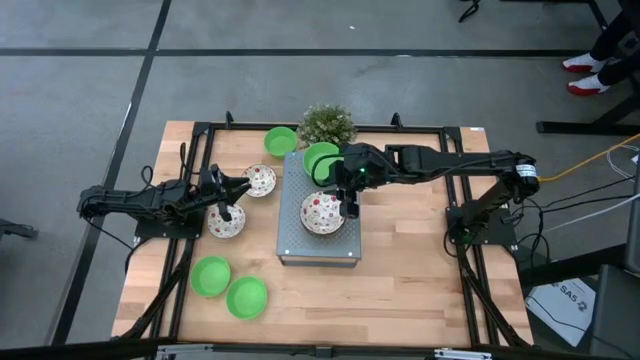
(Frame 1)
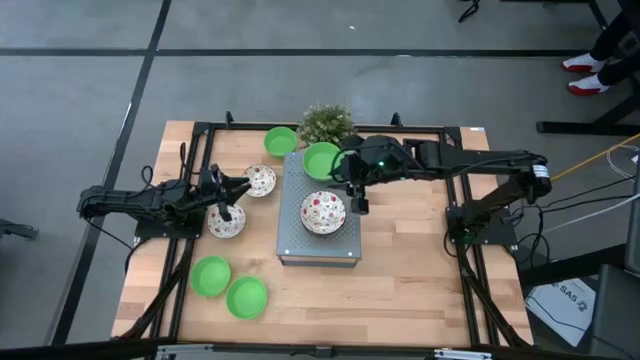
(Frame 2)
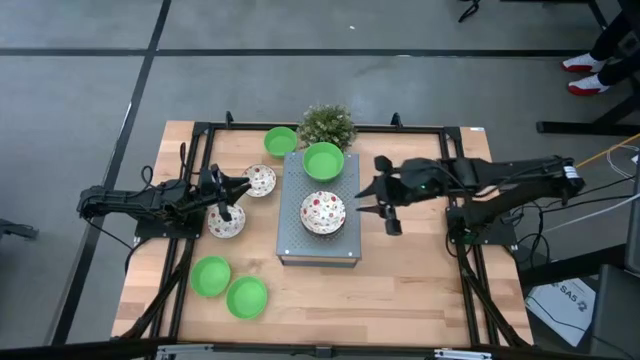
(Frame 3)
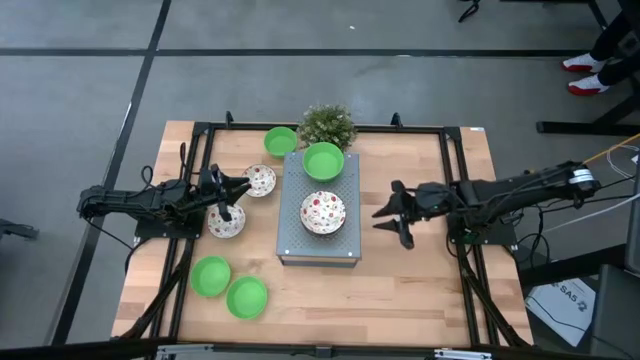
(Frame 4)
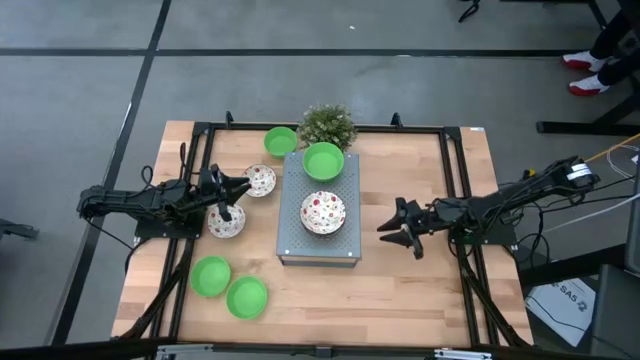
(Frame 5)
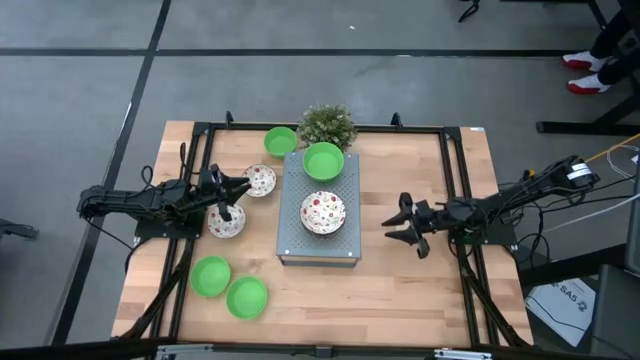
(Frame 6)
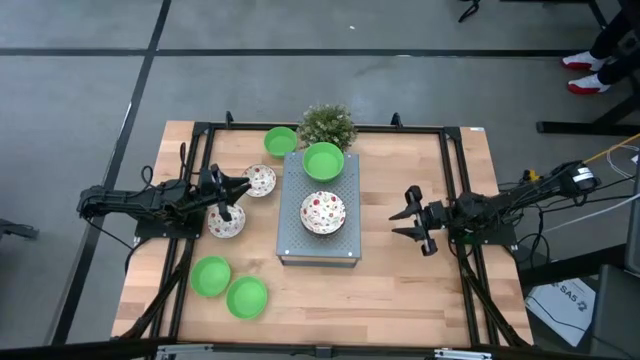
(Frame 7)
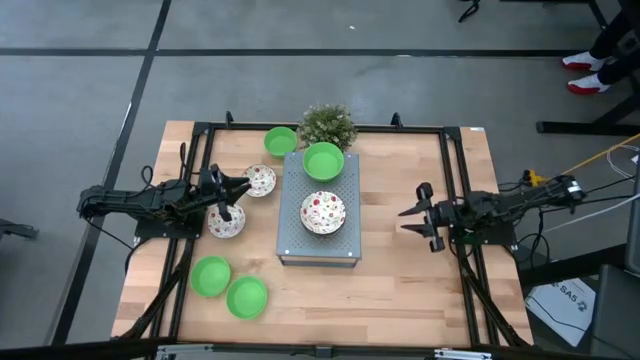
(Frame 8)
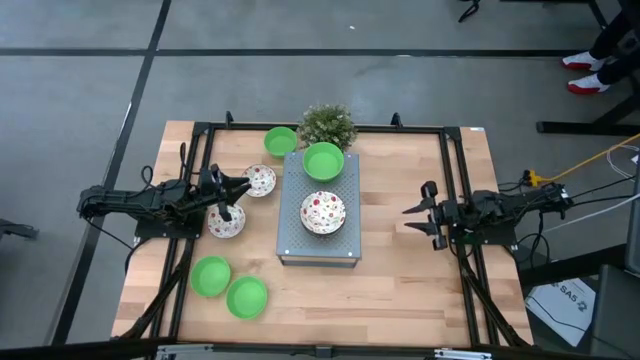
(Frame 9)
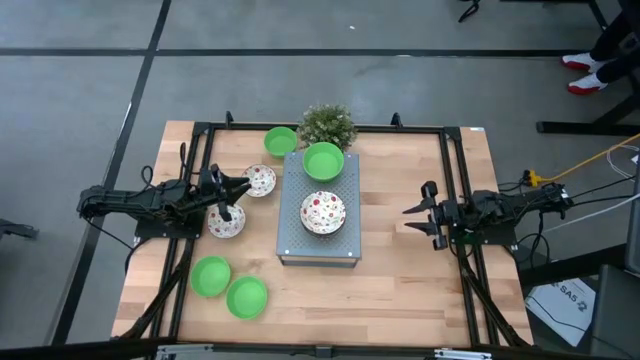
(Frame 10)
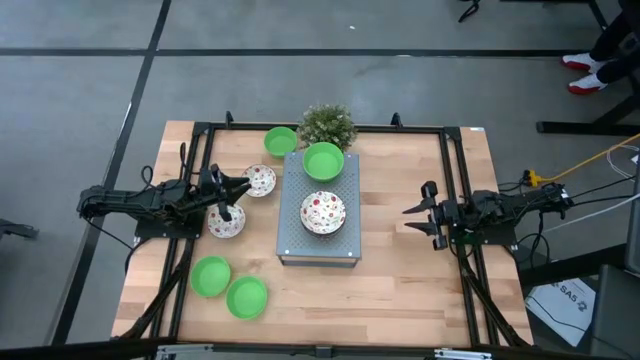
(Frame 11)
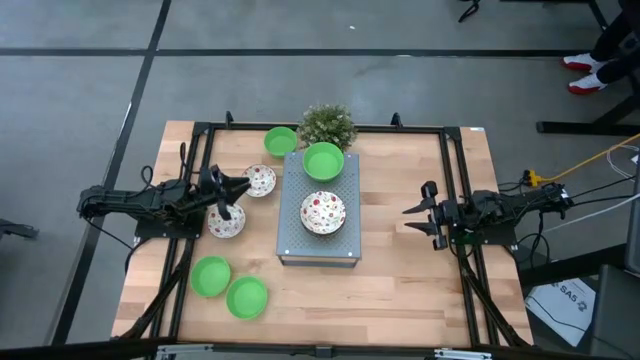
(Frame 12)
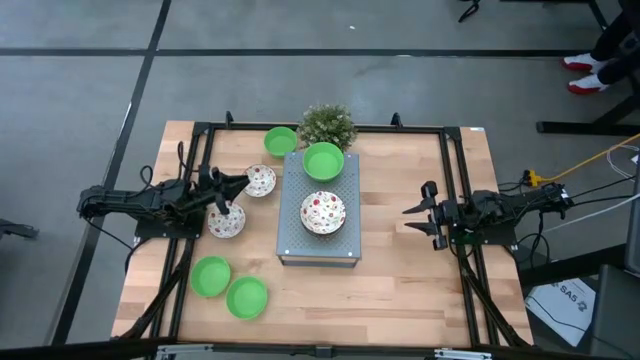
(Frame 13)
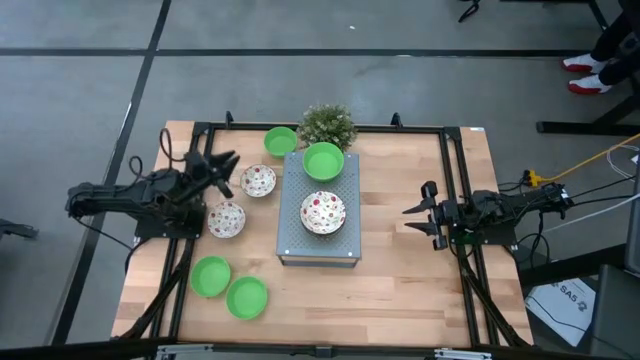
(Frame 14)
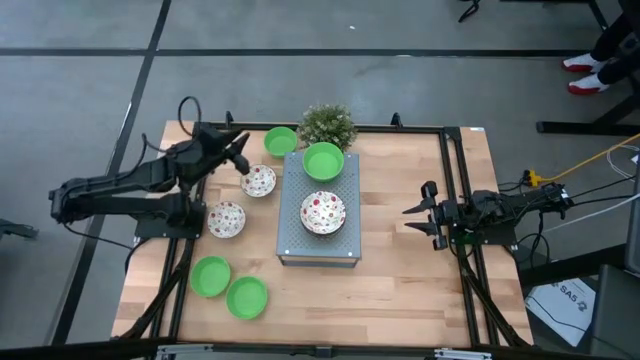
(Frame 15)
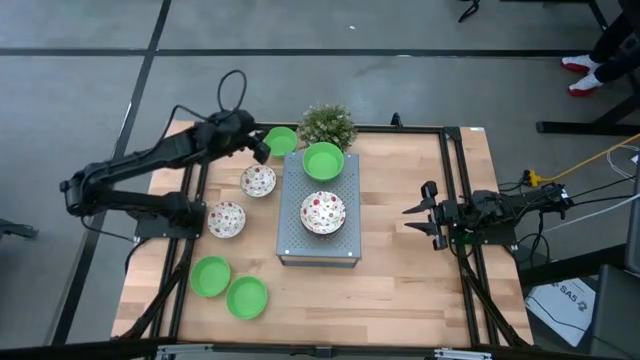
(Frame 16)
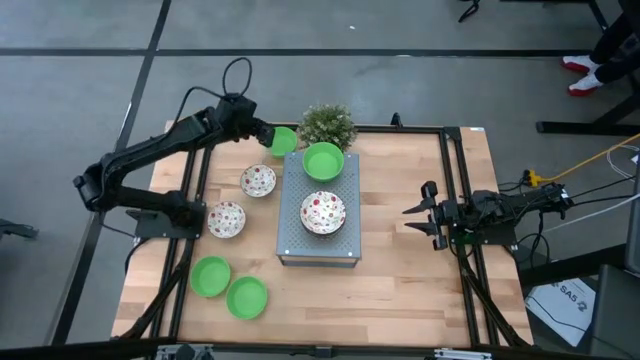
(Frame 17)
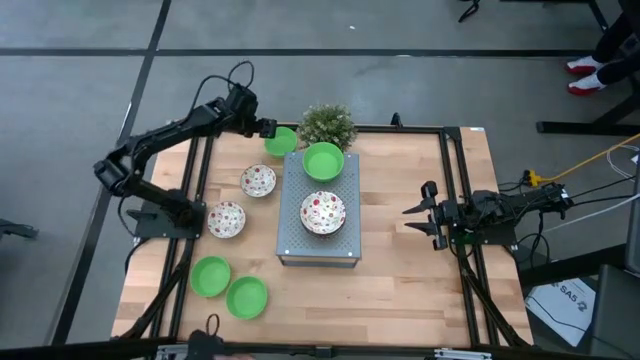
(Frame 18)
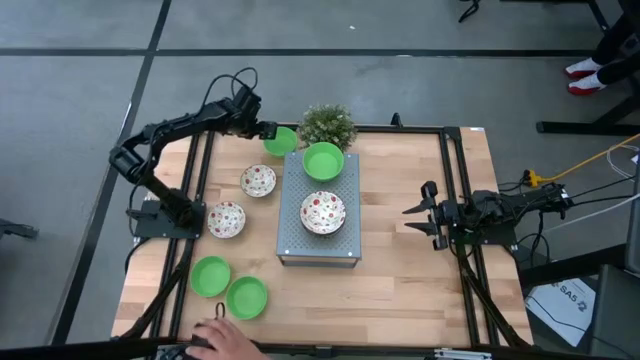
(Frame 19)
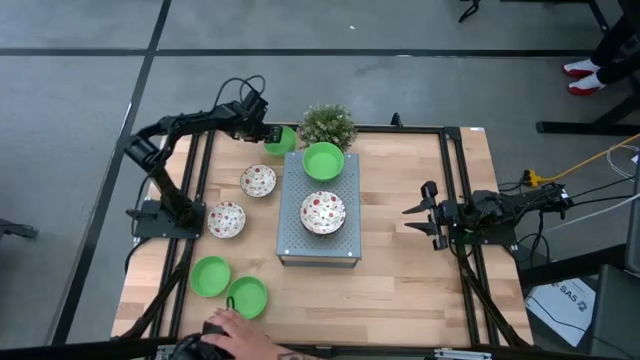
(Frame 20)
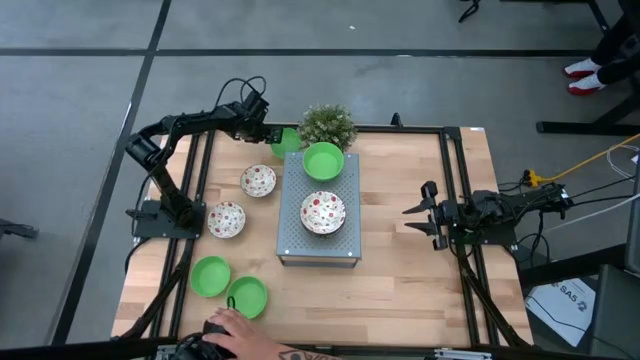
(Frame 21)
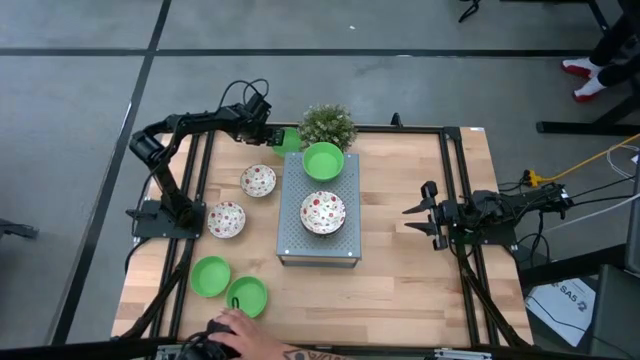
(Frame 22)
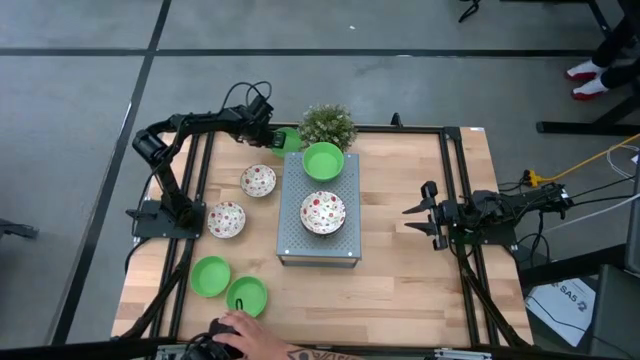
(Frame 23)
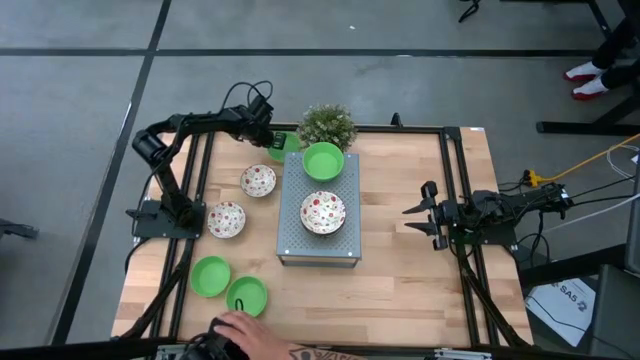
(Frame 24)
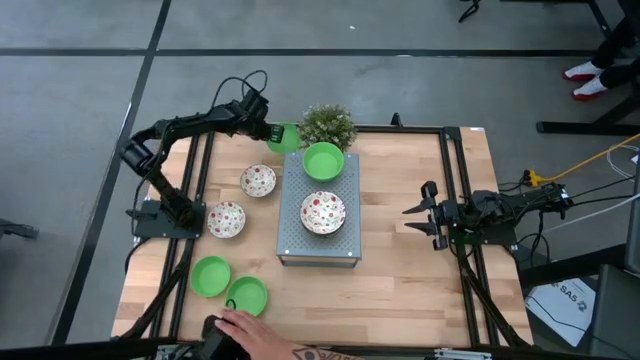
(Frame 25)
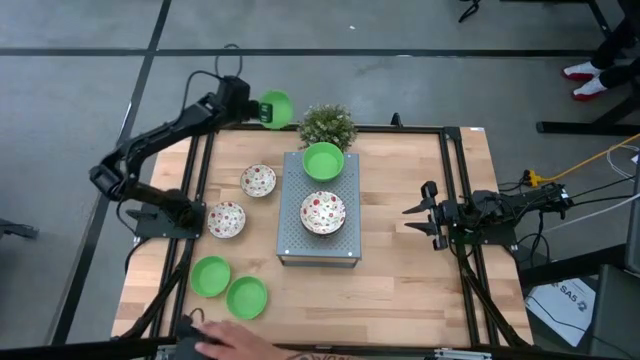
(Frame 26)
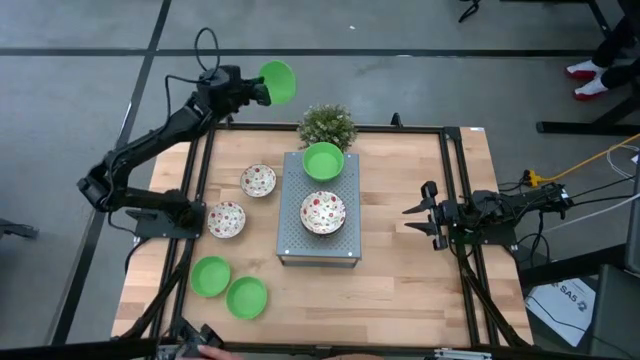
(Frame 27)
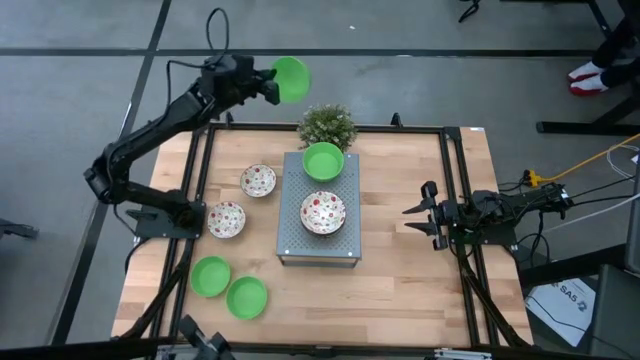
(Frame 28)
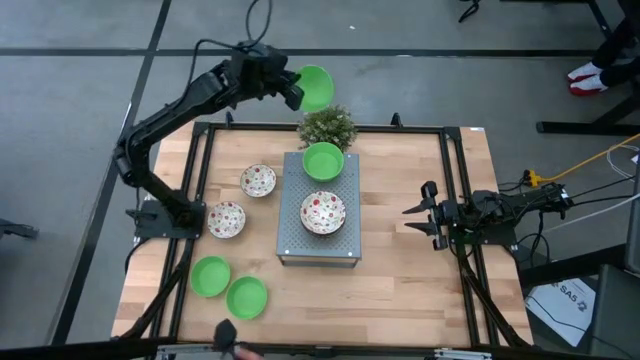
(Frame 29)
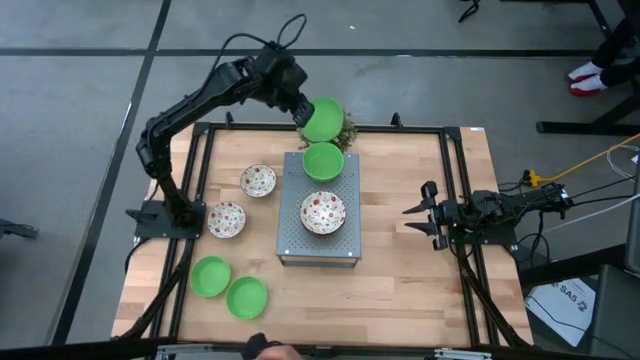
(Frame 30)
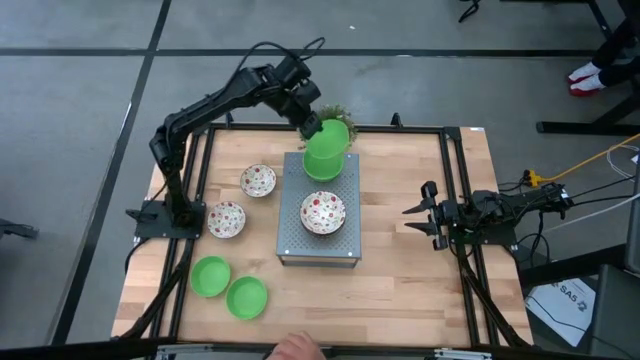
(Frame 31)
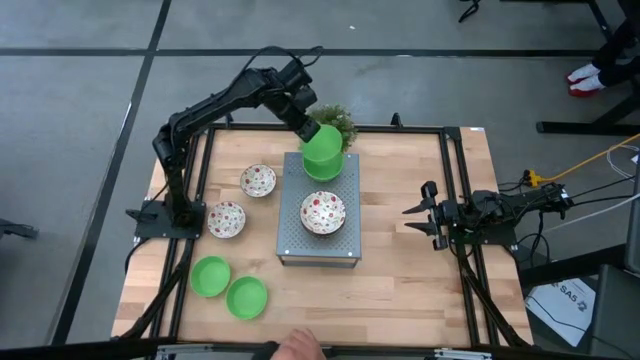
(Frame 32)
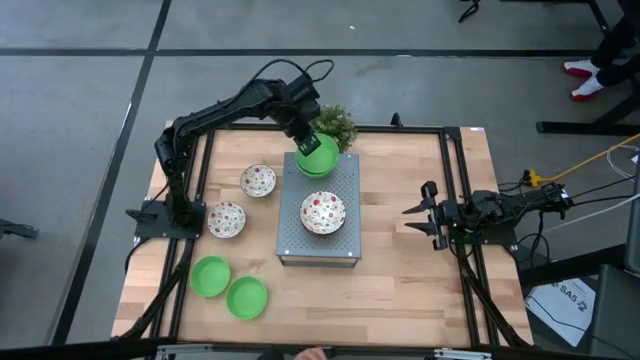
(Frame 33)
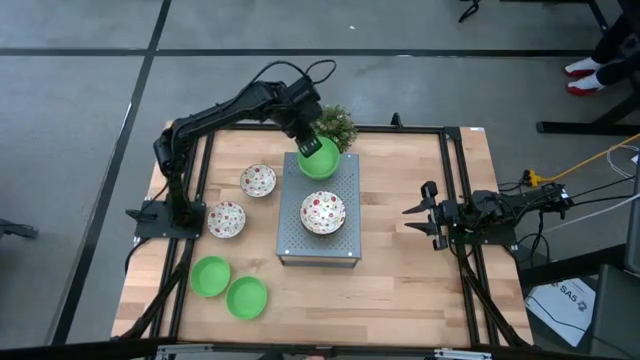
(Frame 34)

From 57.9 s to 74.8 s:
Task: Pick & Place Mini bowls
Stack the green bowl on the green bowl on the shelf
